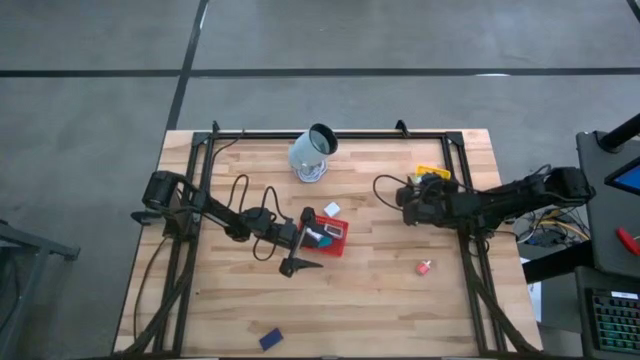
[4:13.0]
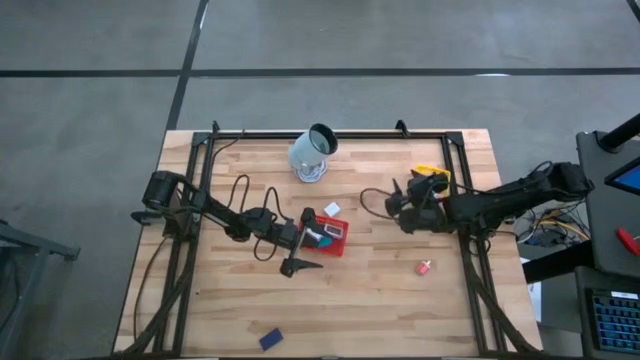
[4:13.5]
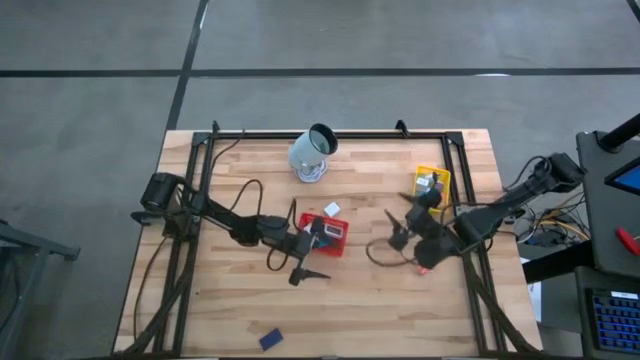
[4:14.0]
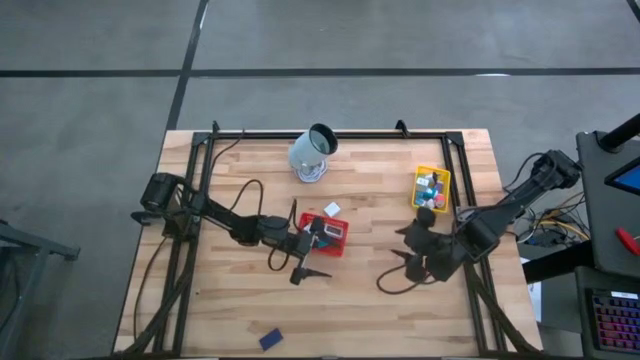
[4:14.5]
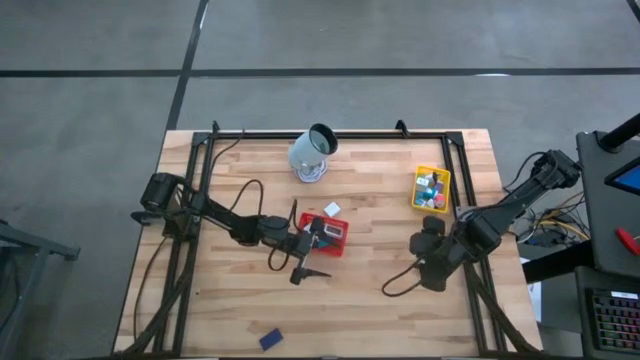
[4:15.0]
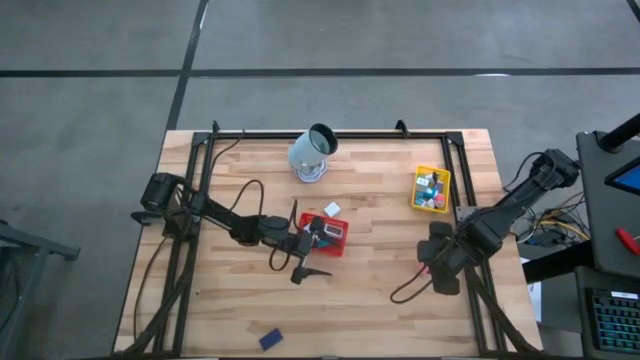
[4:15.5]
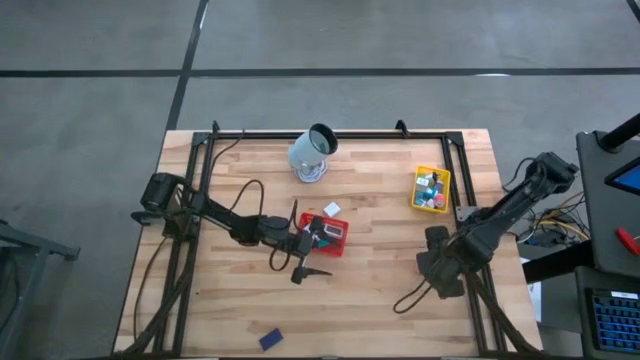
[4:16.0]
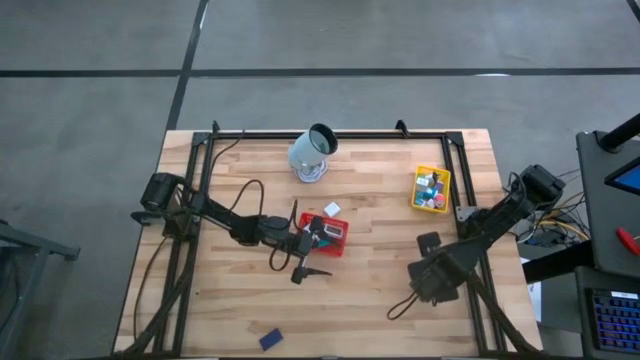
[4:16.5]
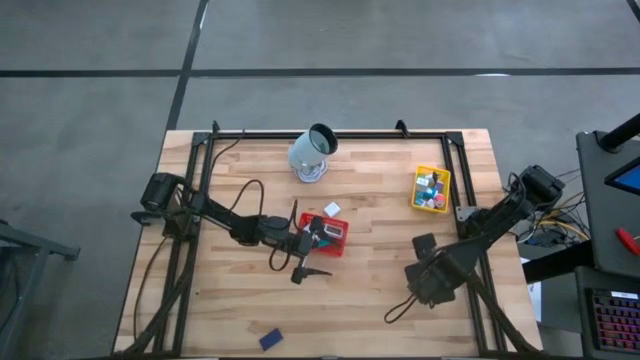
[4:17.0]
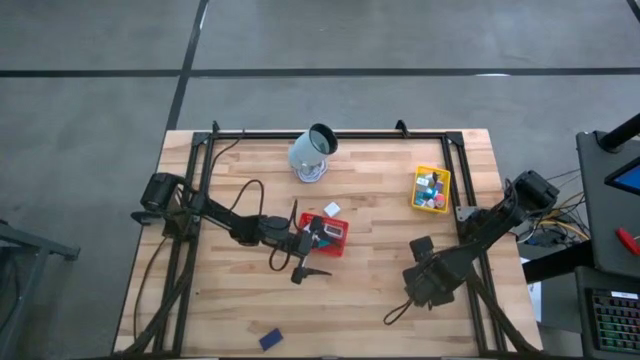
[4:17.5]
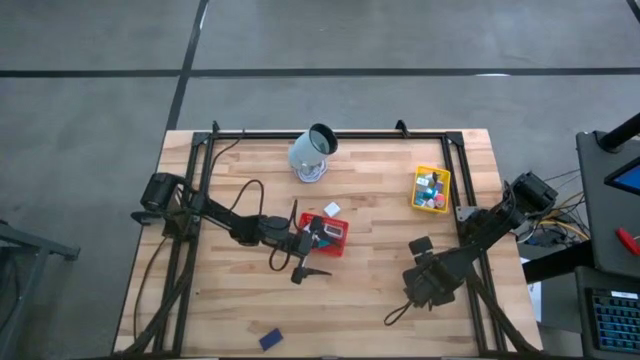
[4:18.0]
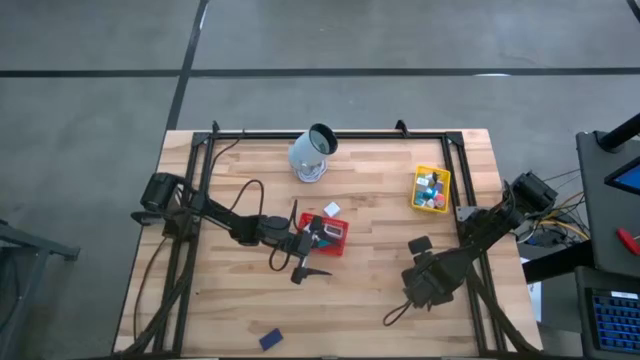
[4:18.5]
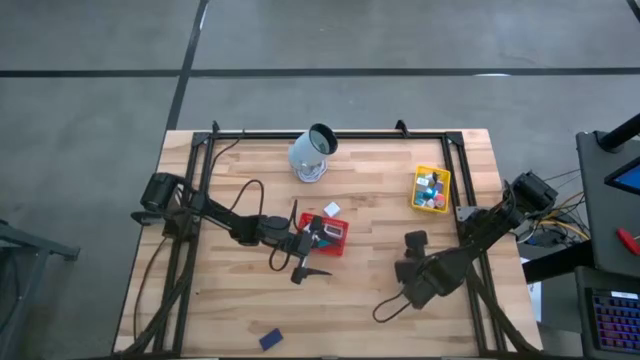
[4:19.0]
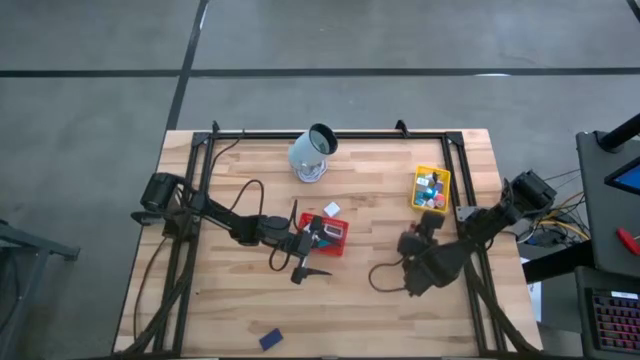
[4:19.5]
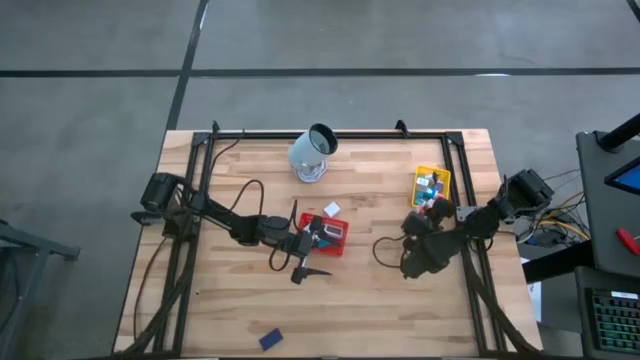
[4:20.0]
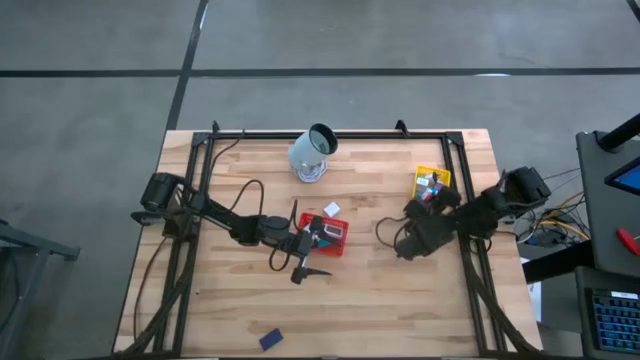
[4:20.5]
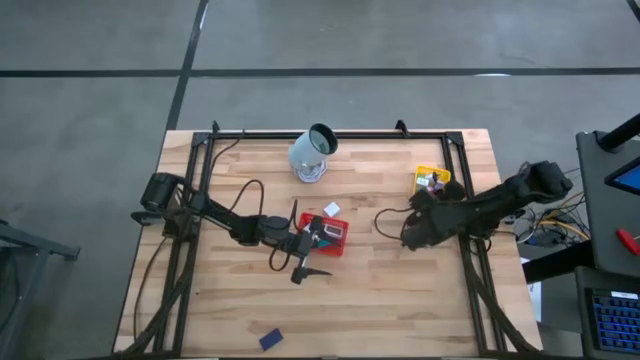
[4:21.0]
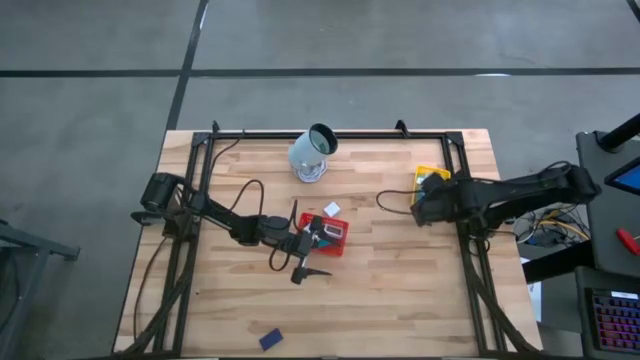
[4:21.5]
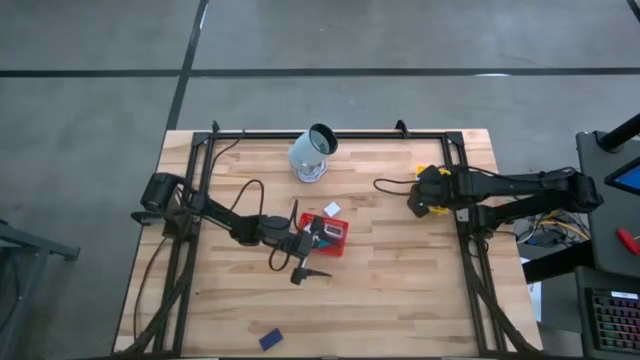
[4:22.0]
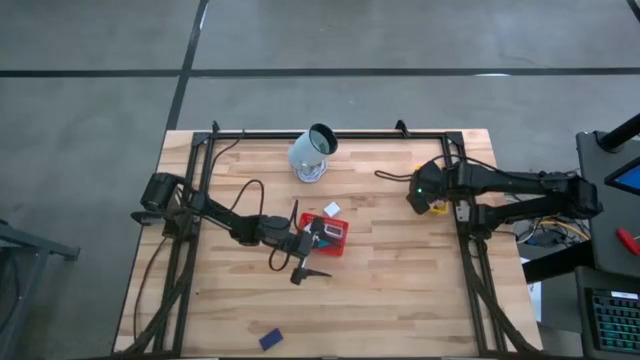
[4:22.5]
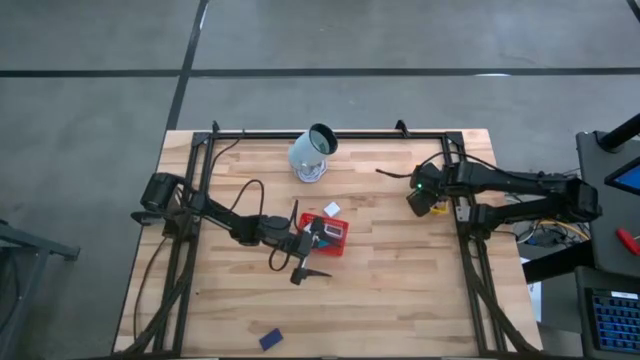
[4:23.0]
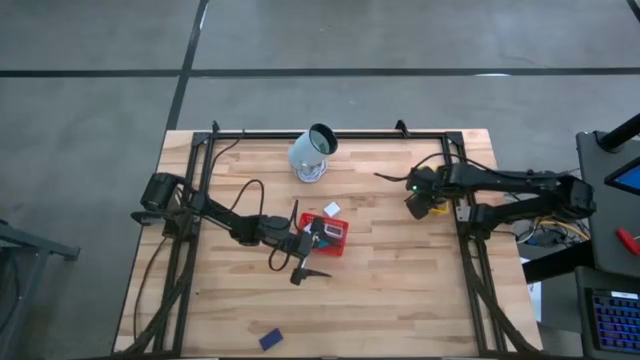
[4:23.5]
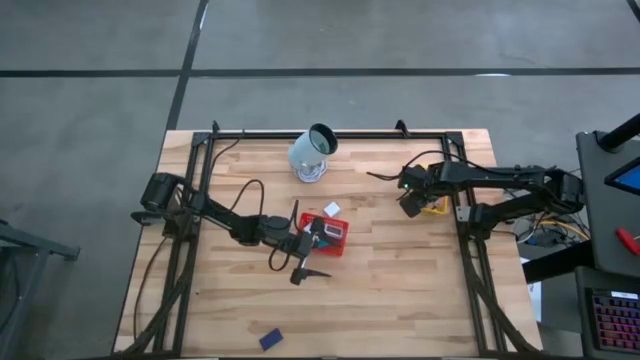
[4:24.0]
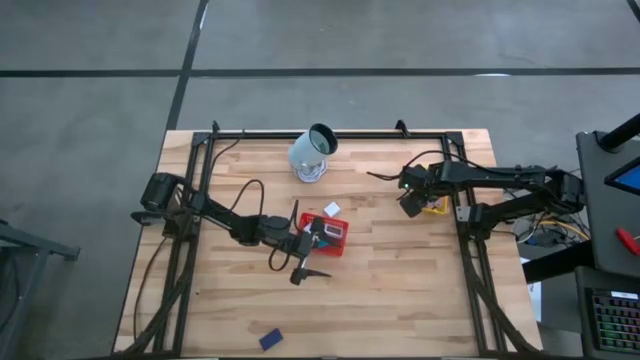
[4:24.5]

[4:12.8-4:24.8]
Task: Pick & Place Office items
Put the pink charger adapter into the yellow basket

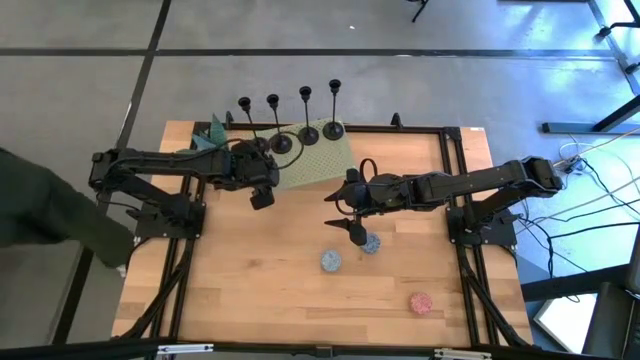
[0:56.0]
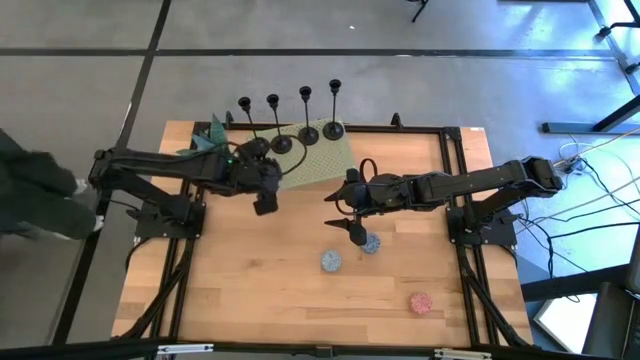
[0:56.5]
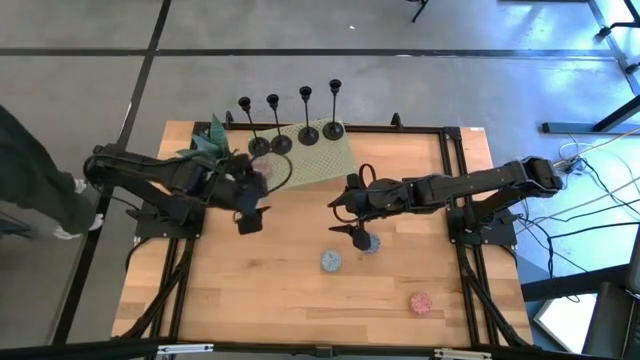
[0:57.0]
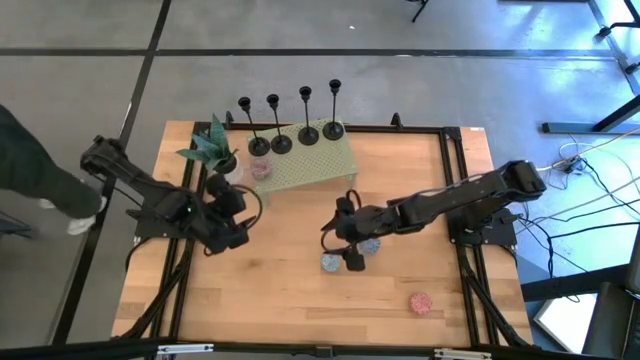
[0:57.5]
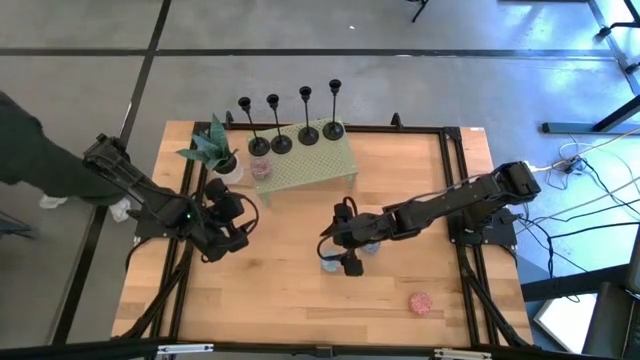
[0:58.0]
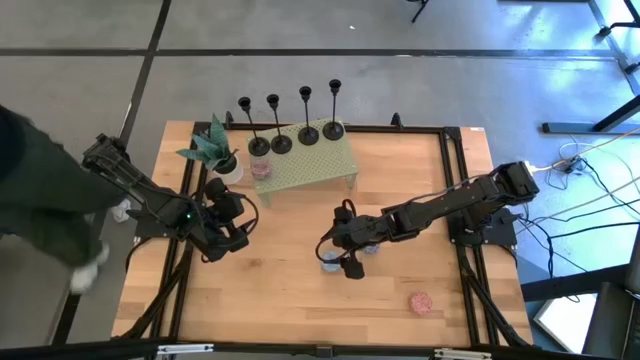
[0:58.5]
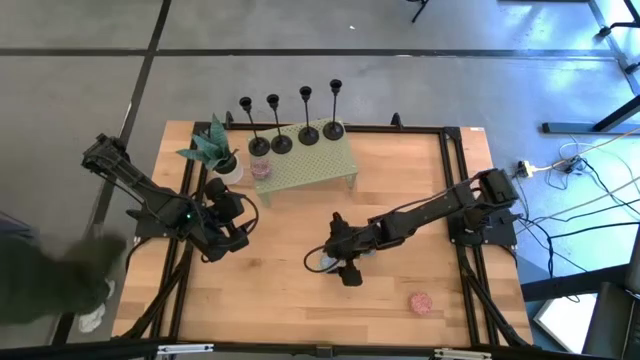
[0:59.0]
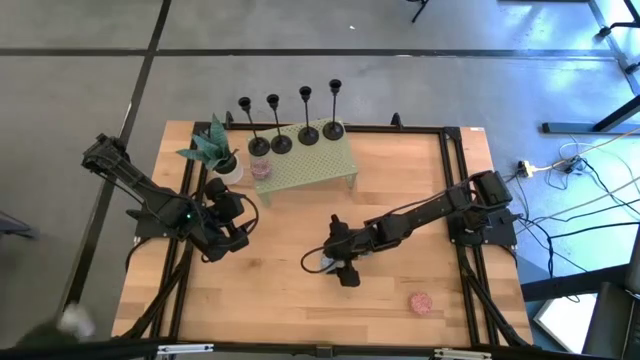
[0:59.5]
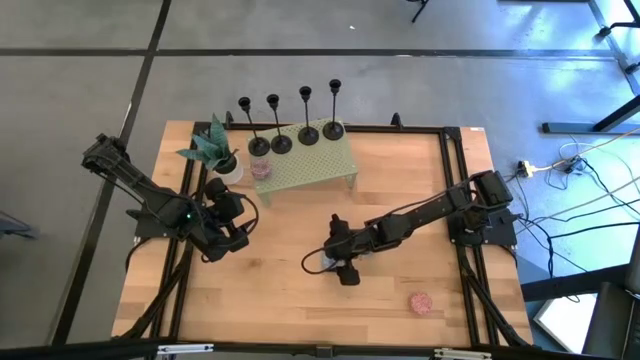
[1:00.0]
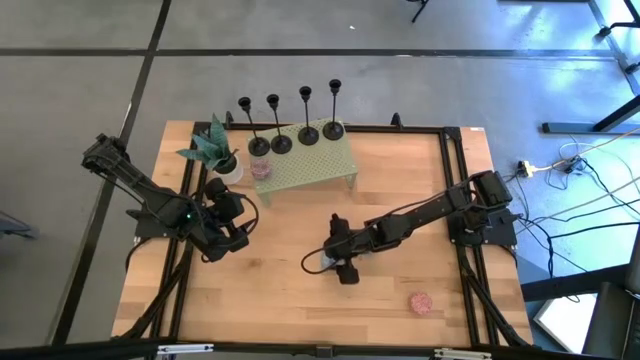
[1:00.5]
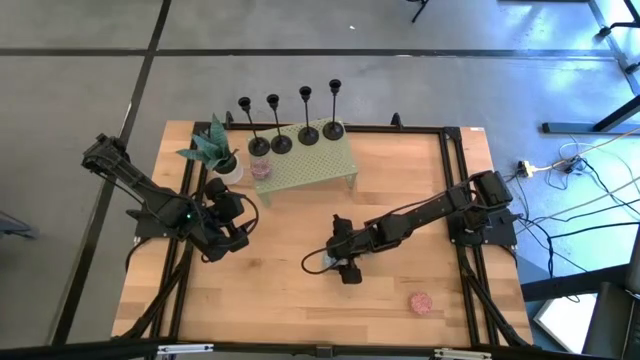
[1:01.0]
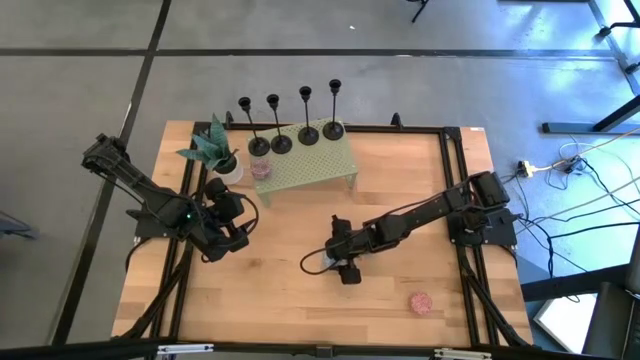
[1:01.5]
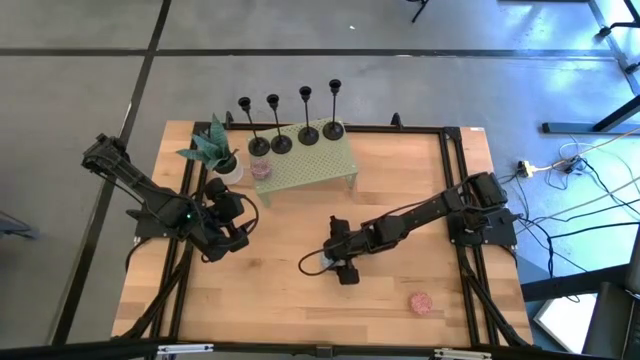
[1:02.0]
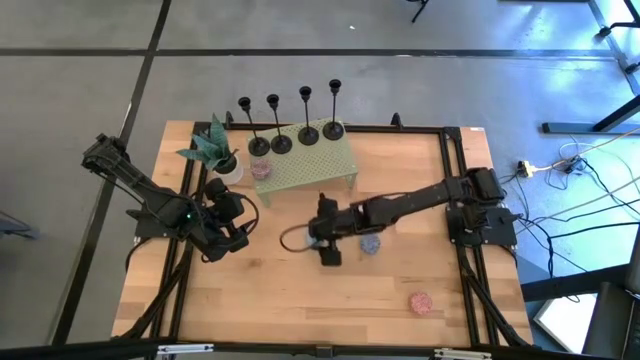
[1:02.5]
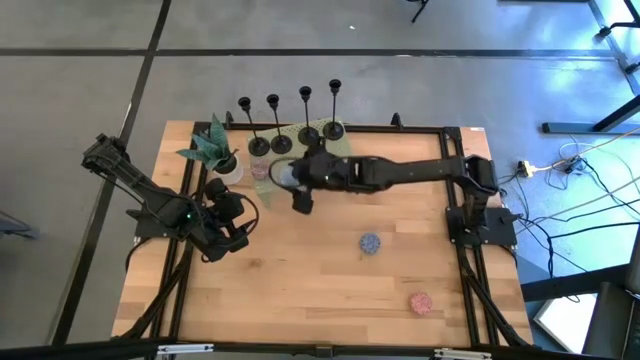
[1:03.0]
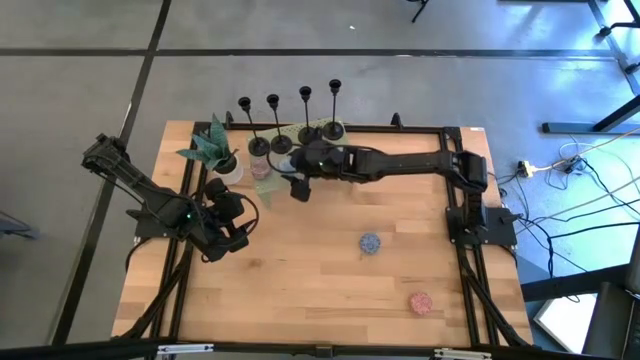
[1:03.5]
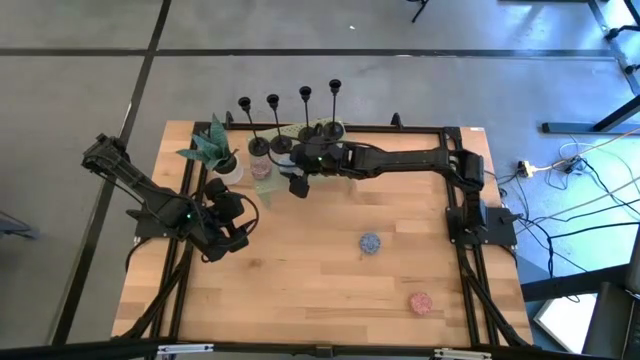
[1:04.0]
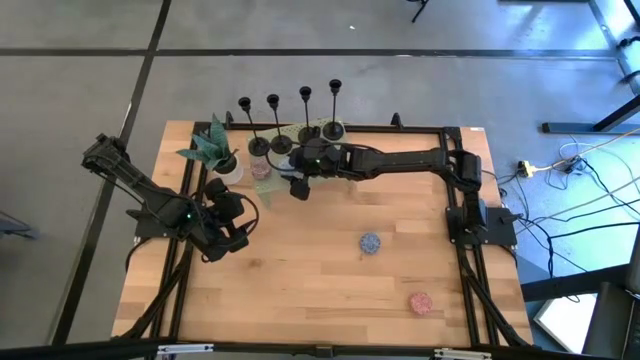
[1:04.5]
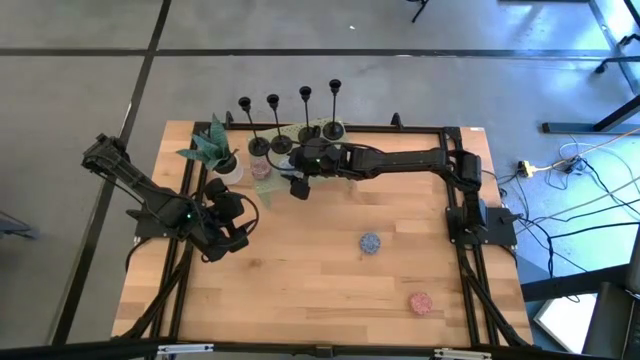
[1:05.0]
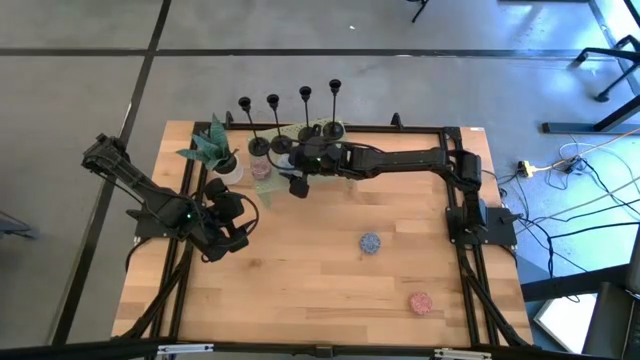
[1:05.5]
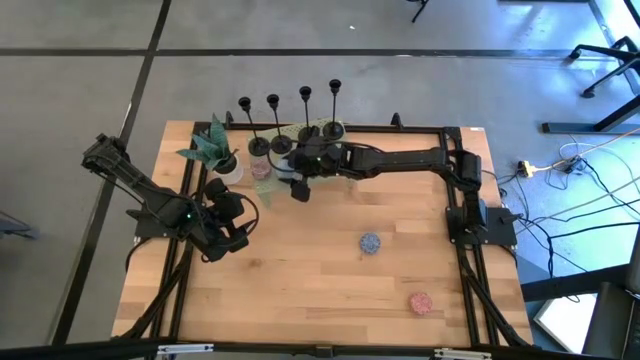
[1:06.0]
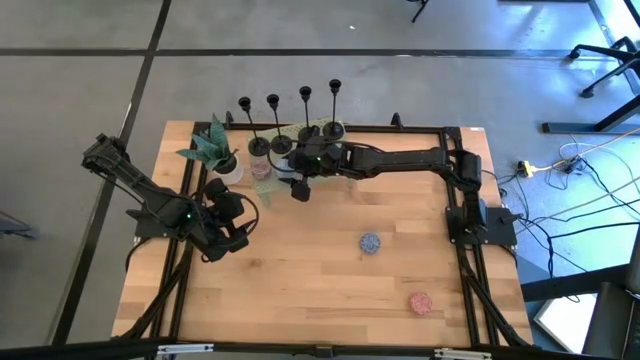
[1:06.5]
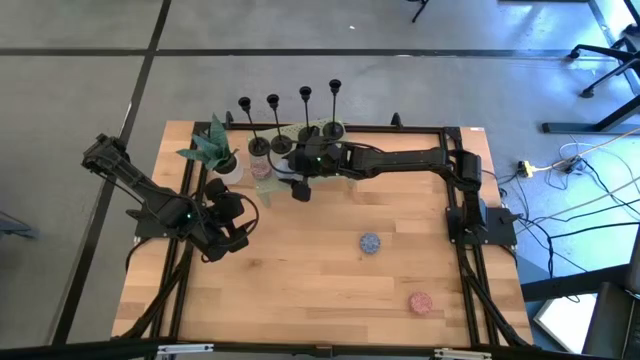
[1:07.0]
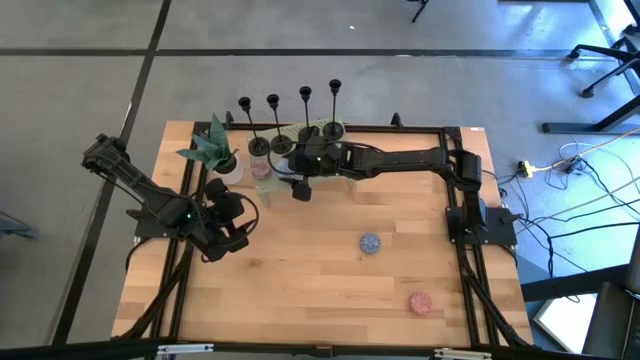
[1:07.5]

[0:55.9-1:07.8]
Task: Pick & Place candle stick holders
Put the light blue scented candle on the shelf
